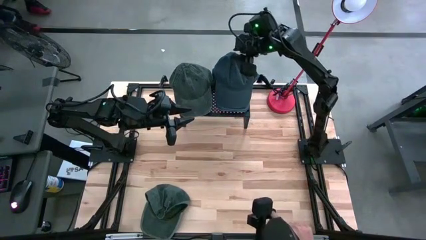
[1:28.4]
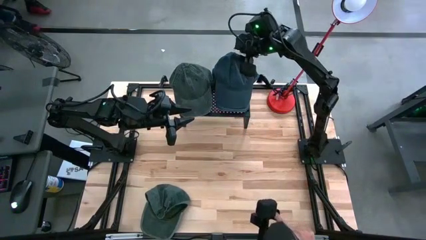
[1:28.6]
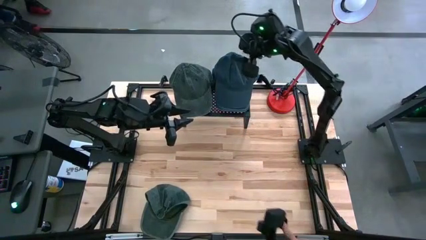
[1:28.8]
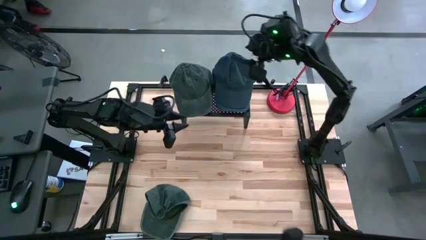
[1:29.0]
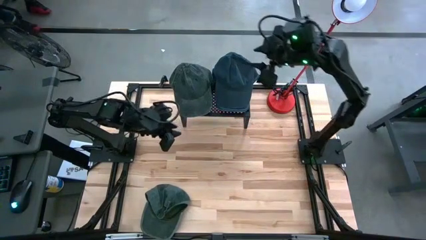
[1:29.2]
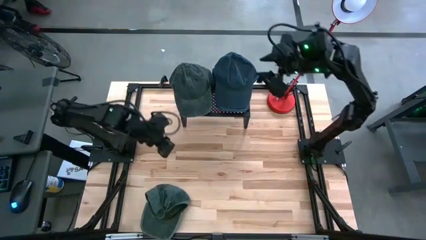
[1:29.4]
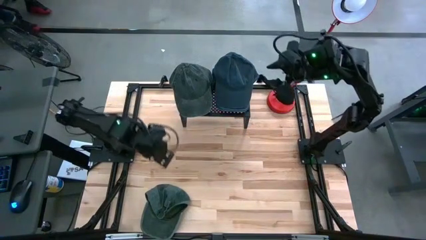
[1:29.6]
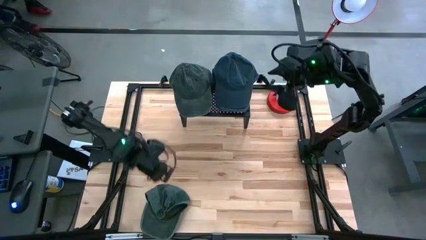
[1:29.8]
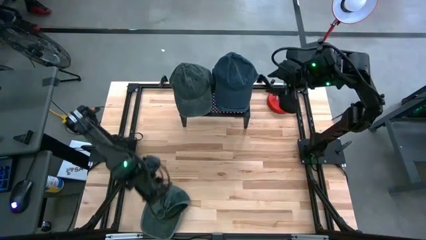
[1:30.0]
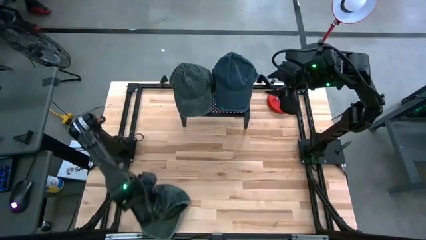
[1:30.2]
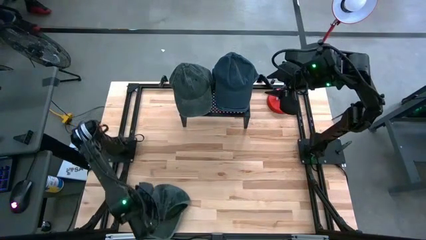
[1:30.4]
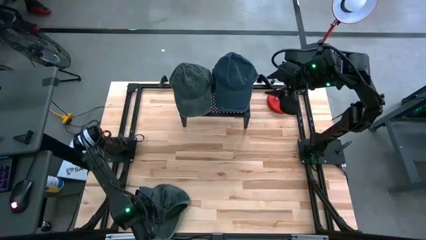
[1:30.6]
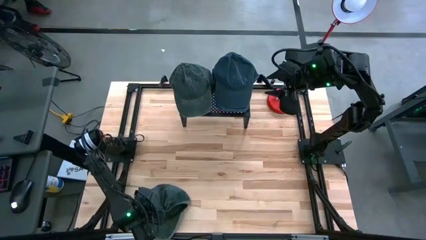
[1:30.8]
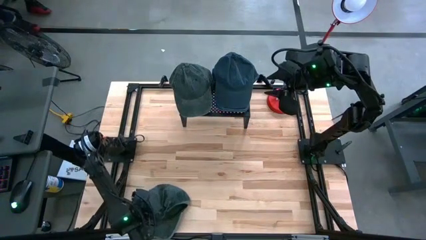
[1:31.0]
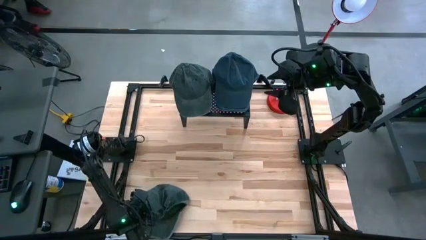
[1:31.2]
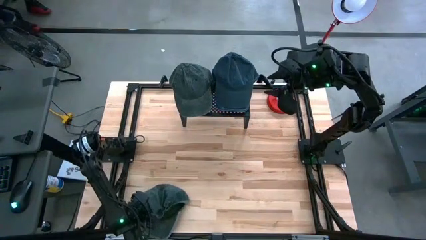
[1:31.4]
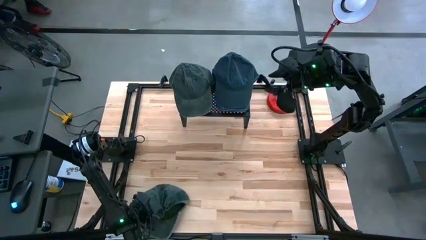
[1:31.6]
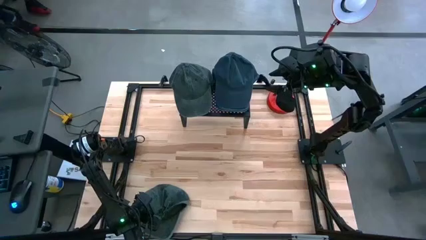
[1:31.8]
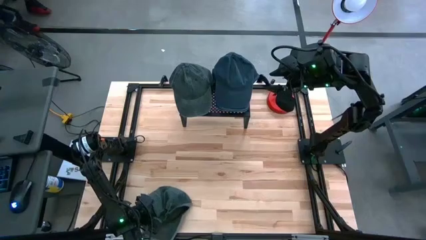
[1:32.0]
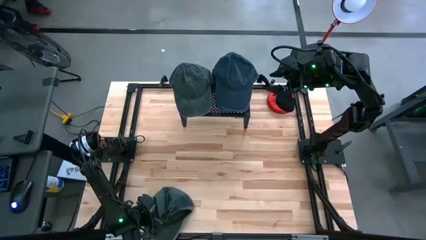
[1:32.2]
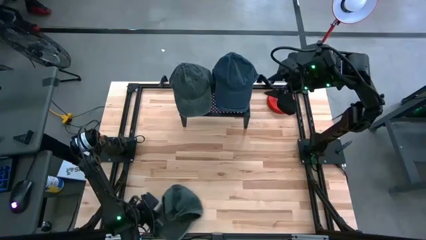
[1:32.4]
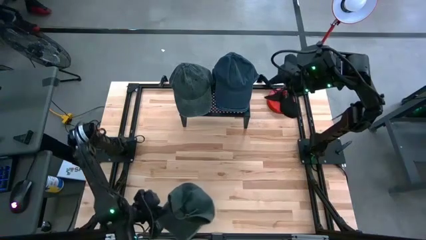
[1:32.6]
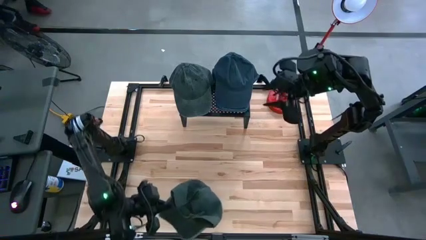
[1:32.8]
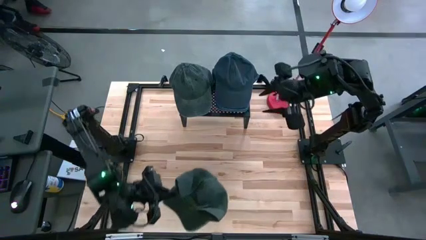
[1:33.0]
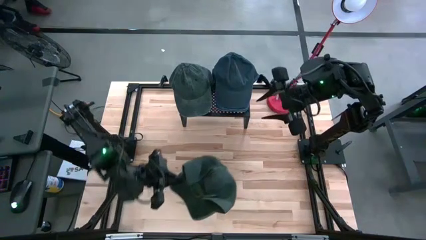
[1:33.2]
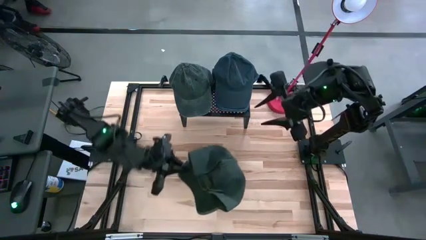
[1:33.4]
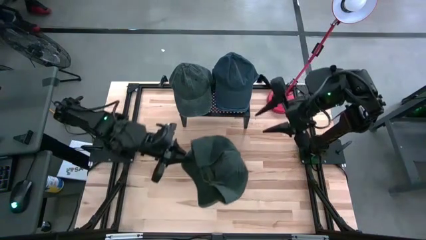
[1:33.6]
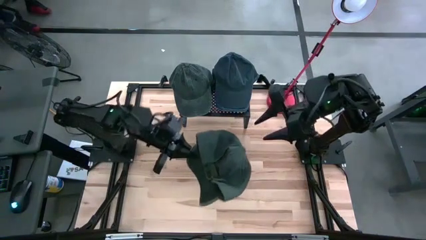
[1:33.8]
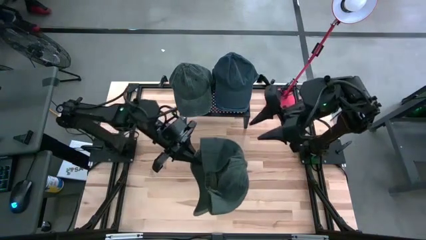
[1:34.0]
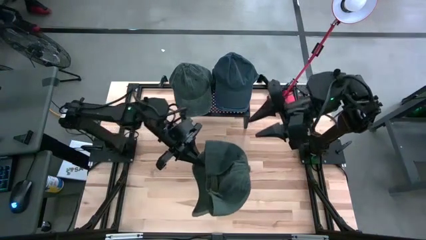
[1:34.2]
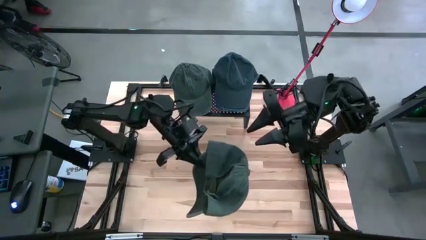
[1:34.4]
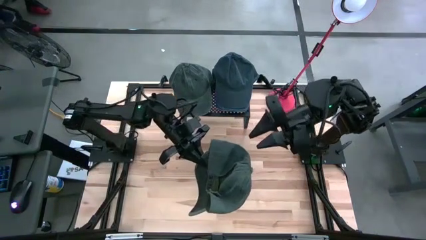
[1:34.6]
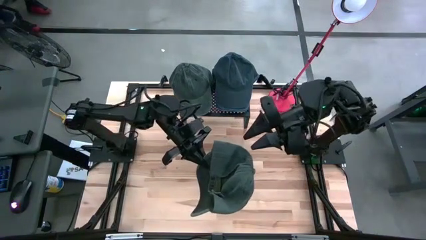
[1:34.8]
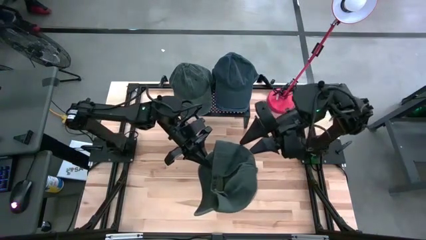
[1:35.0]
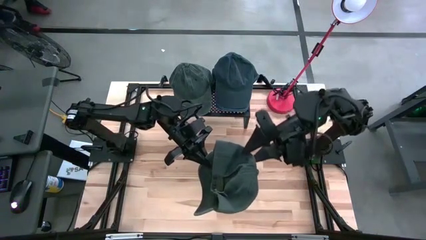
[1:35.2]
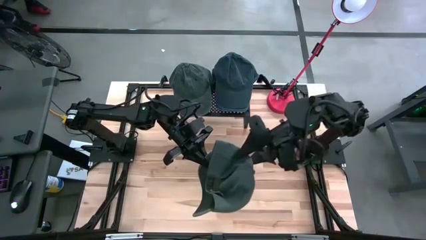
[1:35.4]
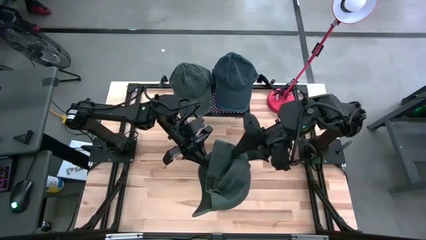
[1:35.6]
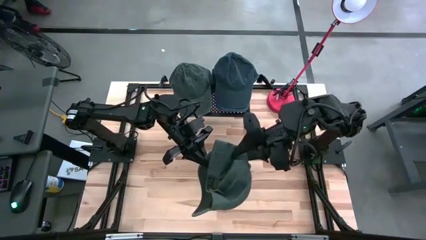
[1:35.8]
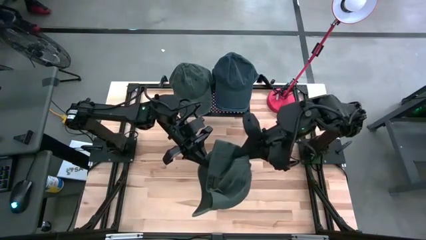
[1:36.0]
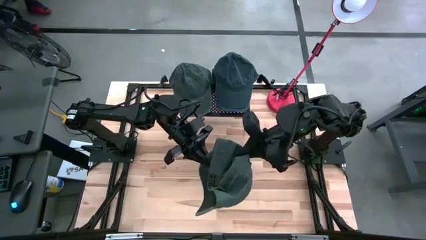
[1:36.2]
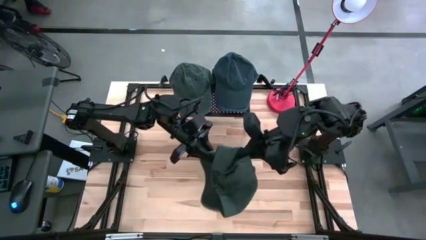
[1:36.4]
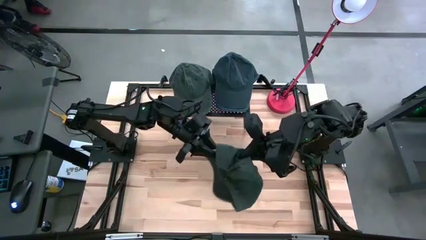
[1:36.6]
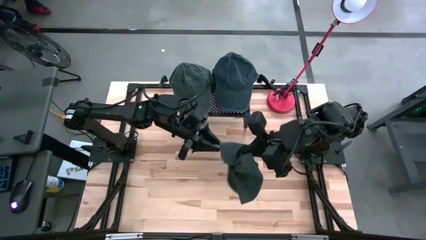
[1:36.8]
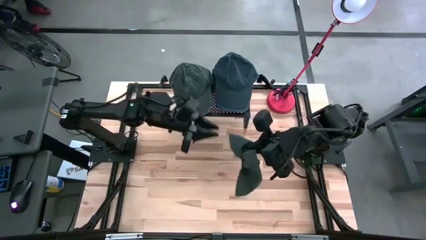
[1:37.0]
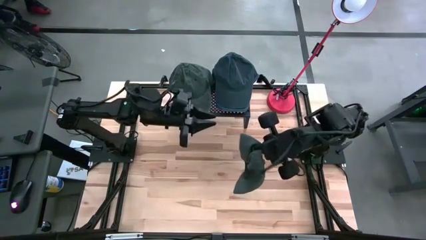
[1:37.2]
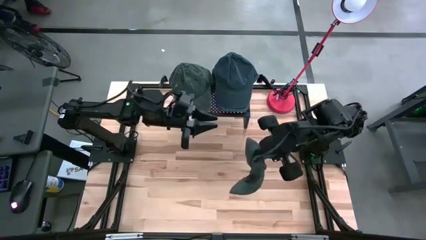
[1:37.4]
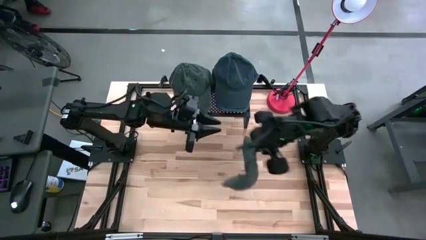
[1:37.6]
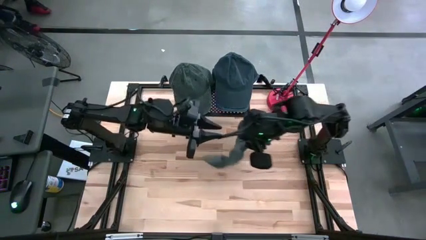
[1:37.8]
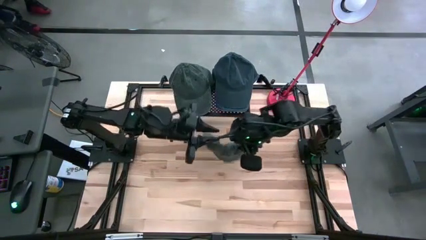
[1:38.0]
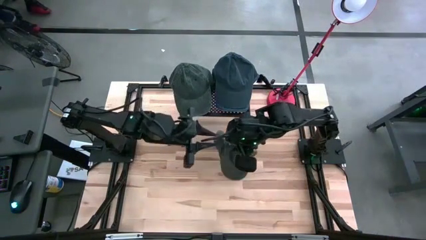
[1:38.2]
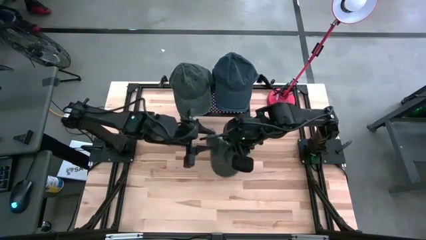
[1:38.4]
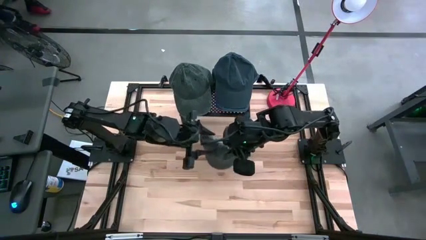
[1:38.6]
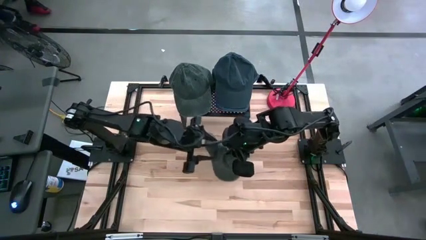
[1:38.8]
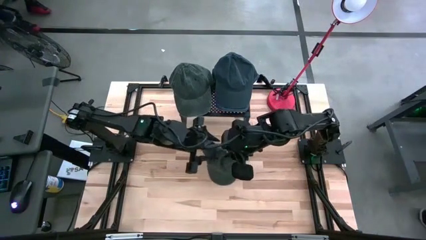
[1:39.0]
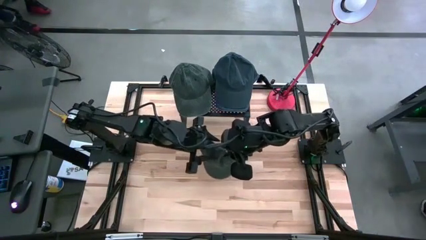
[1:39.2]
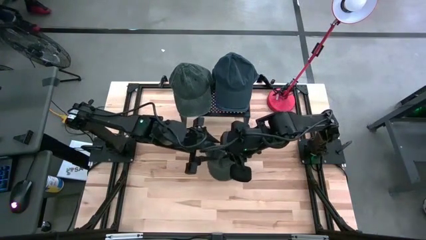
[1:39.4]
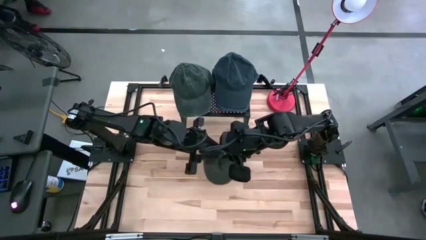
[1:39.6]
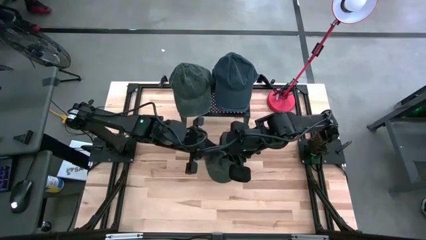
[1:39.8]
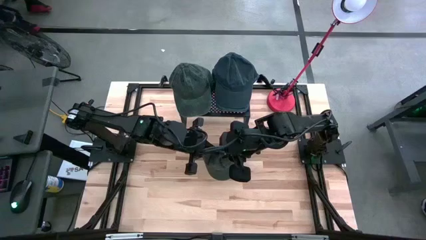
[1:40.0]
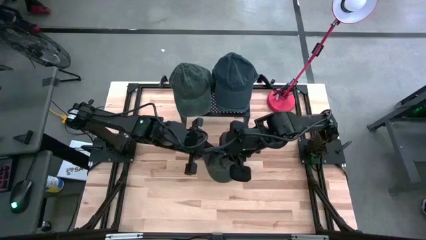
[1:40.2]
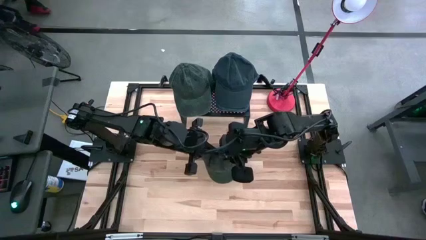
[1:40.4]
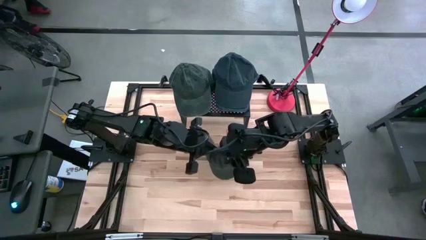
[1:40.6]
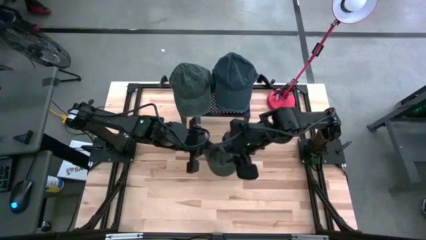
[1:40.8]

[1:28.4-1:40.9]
Task: Pick & Place hat
Stack the dark green cap on top of the other dark green caps on the shelf
